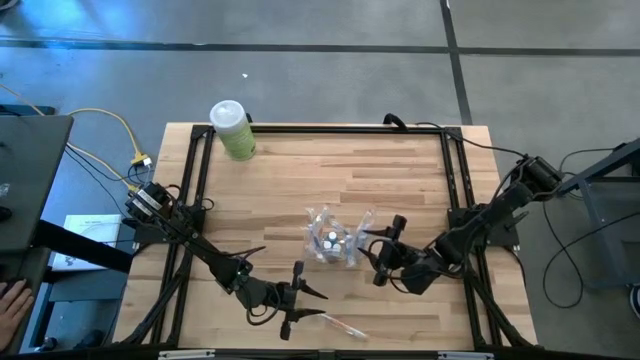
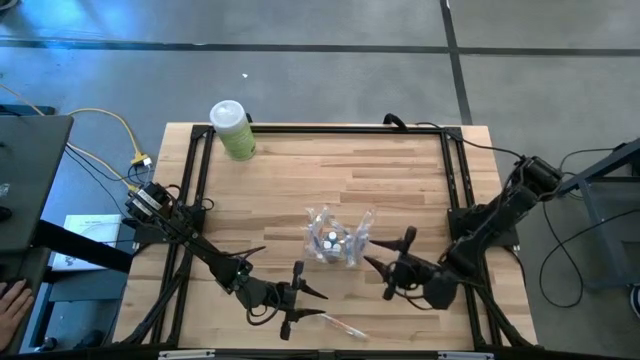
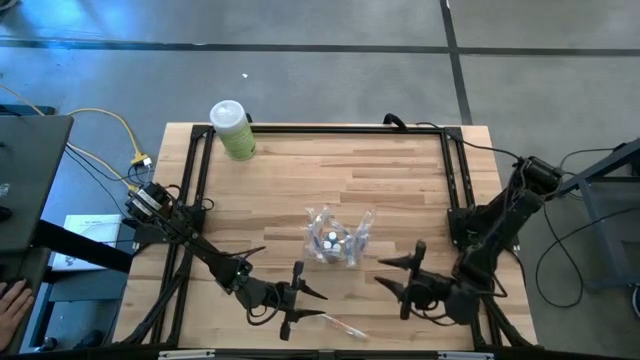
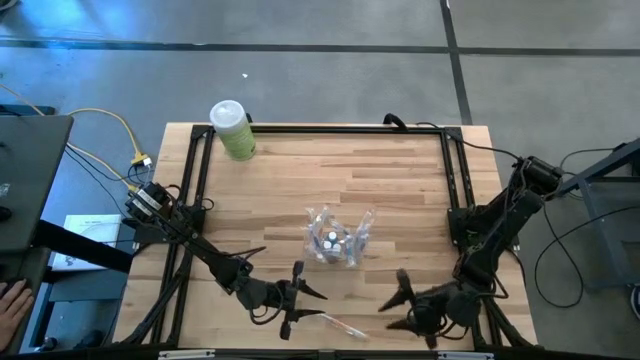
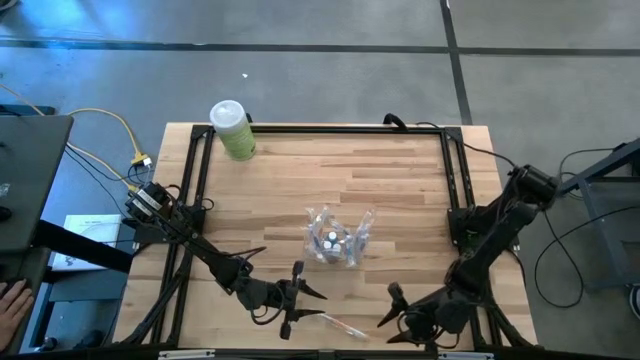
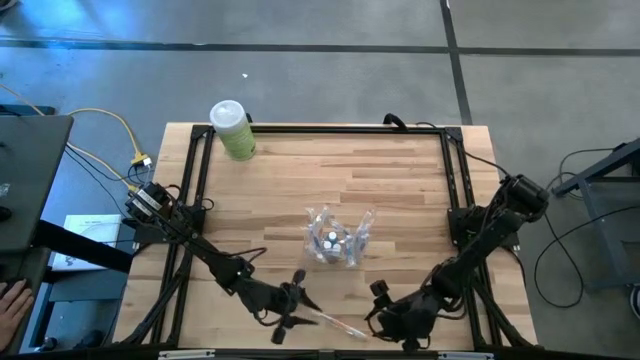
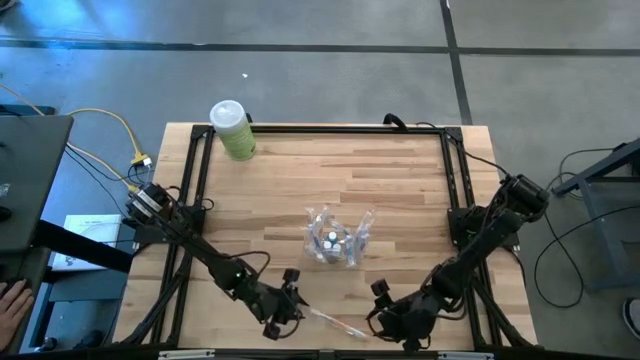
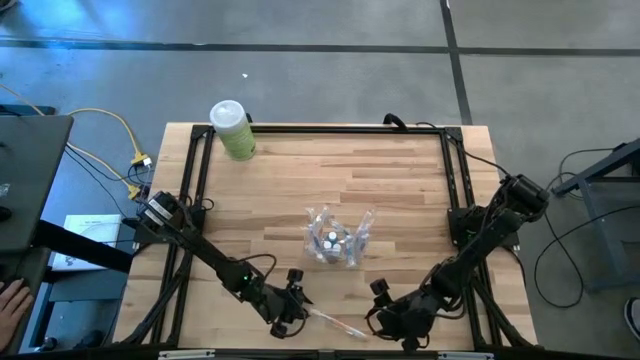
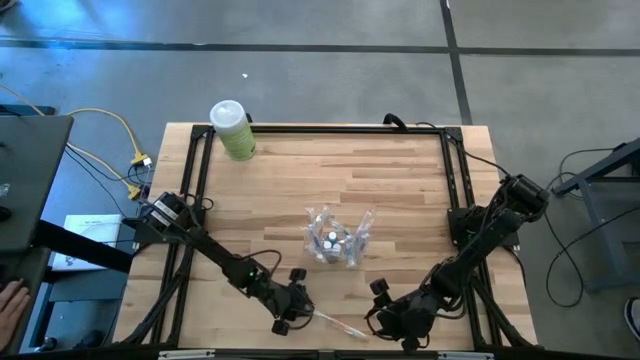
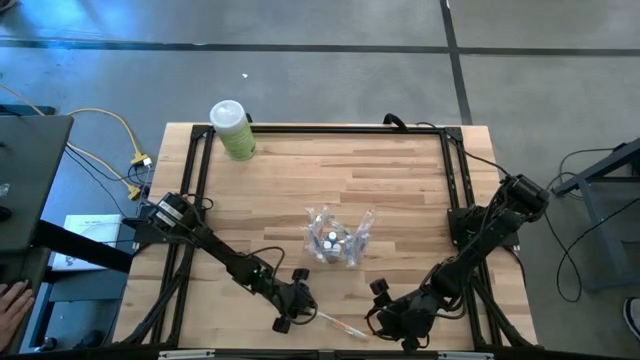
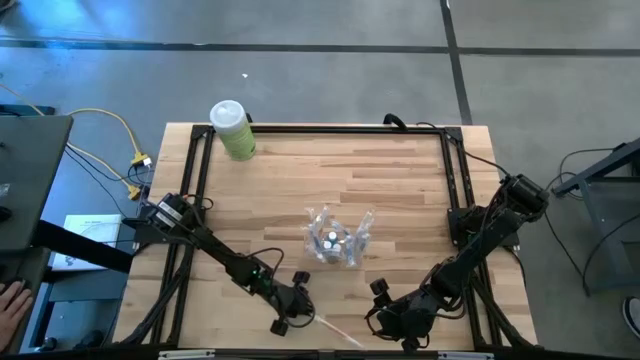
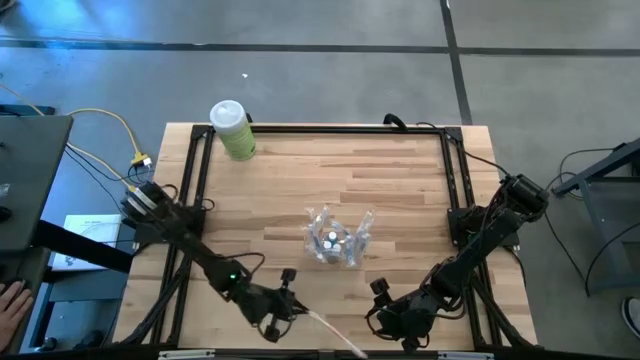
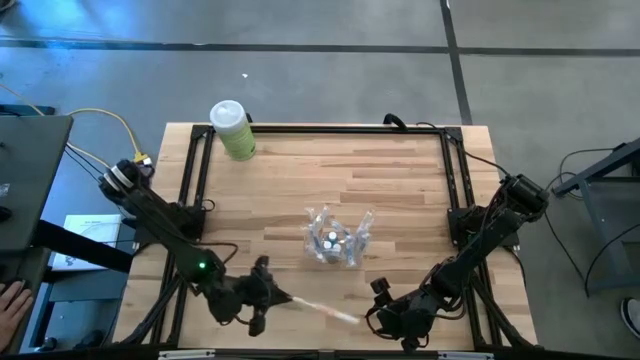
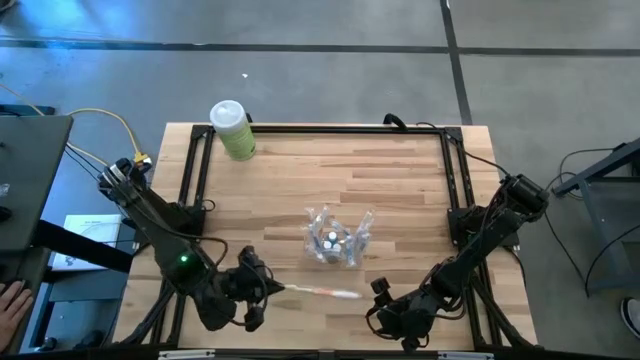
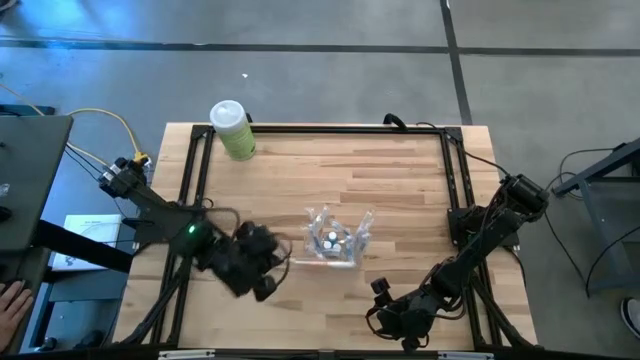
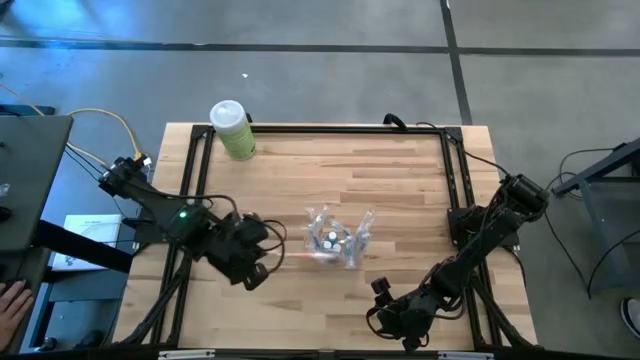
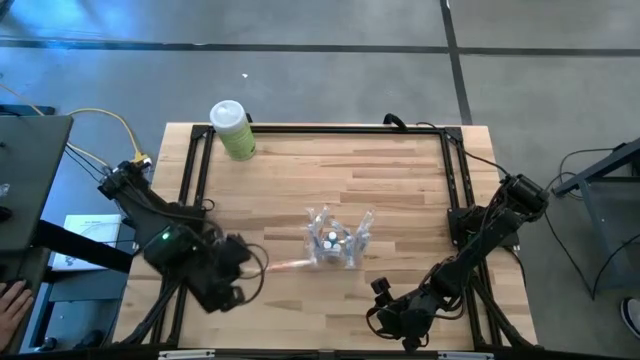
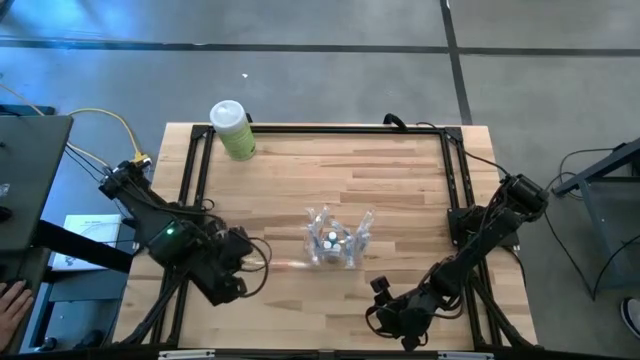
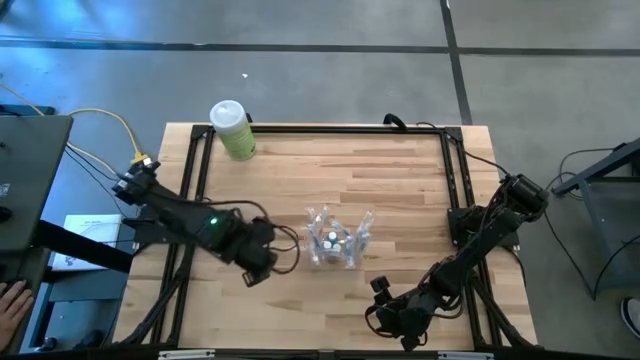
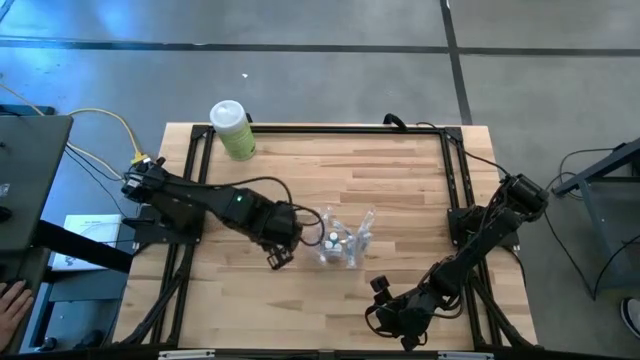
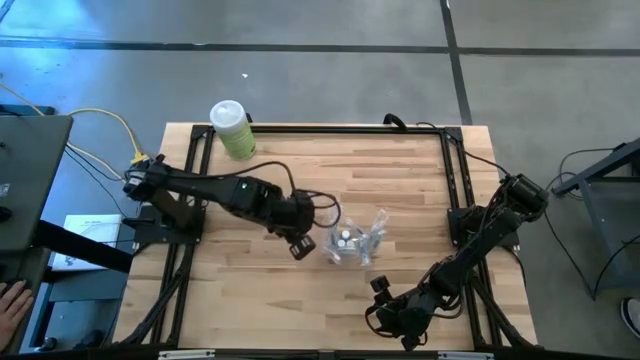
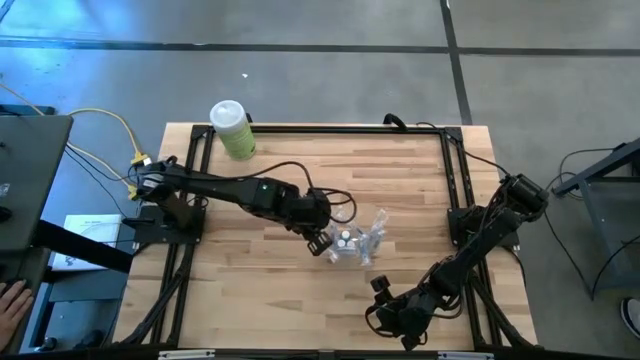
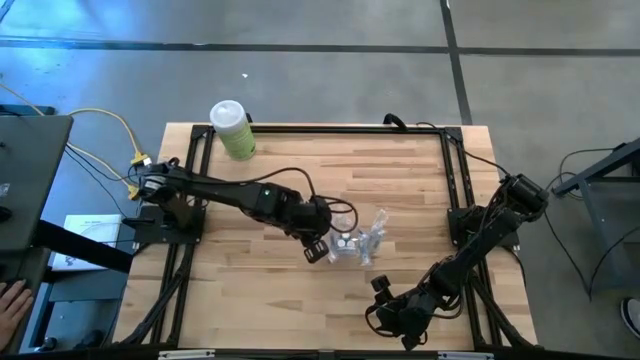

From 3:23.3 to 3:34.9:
Task: Pick & Place toothbrushing station
Put the orange toothbrush into the transparent organizer

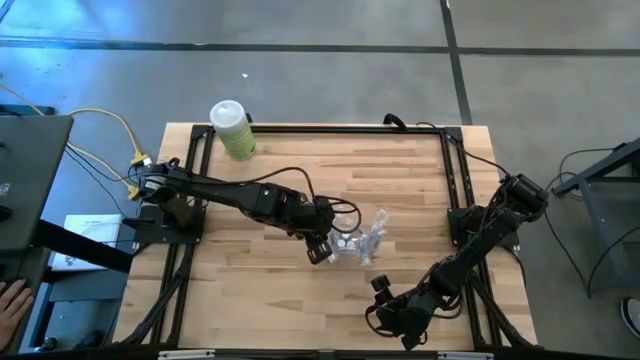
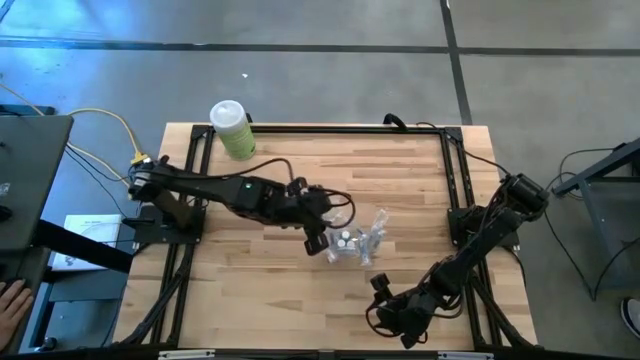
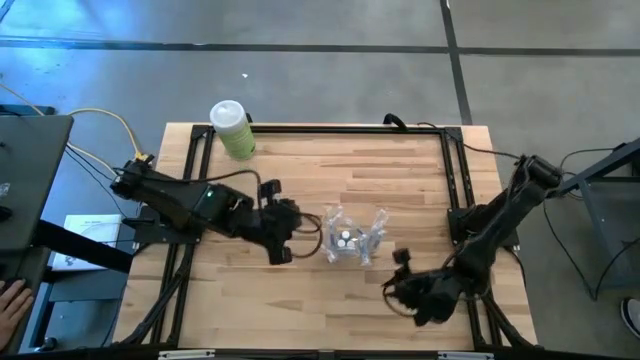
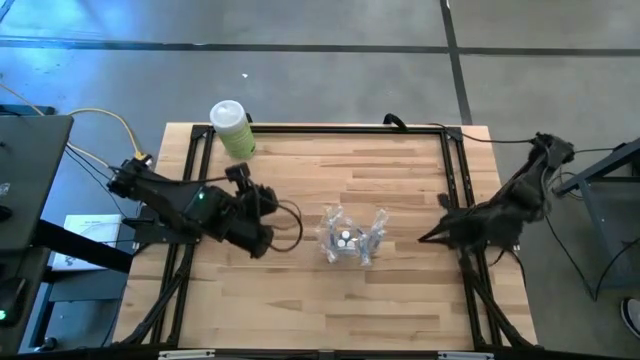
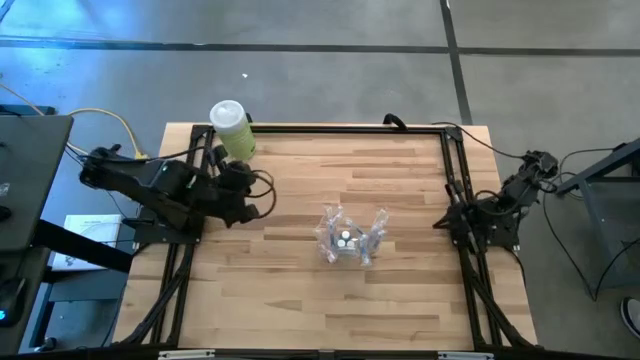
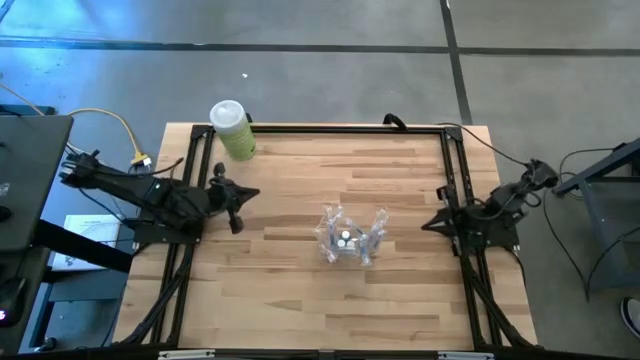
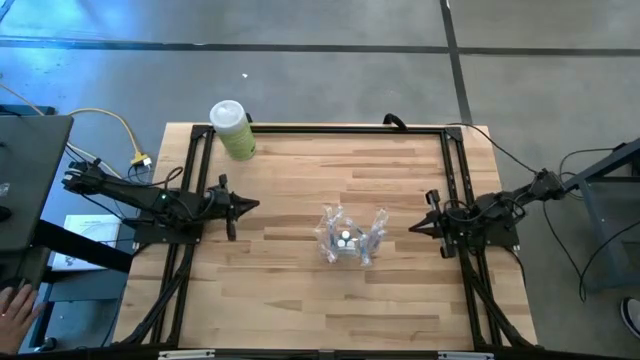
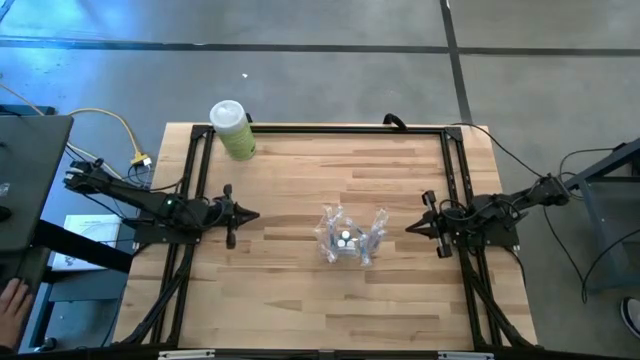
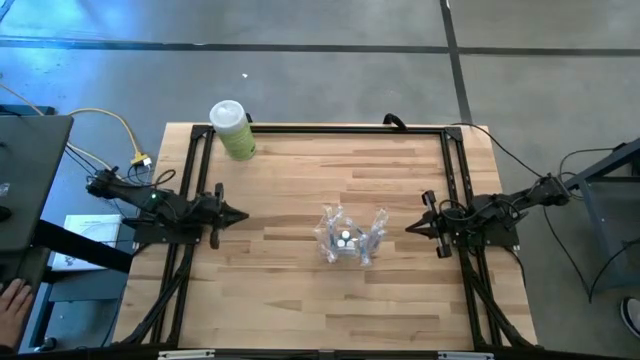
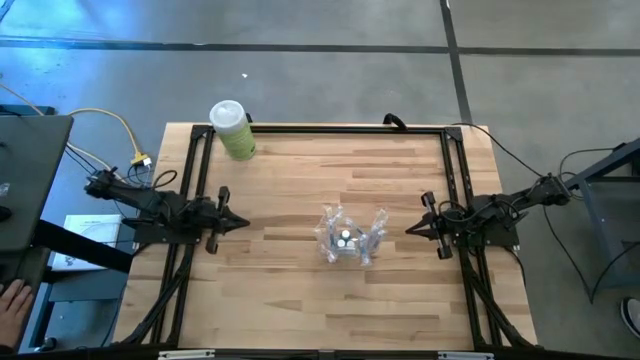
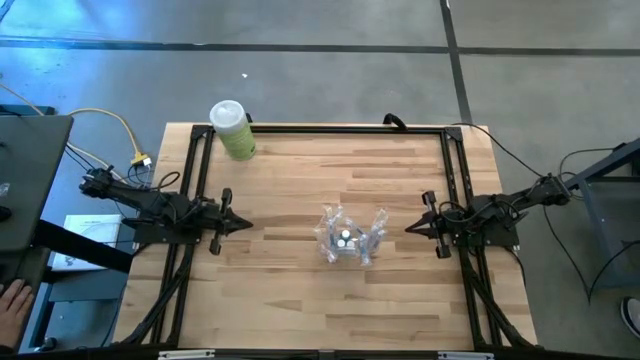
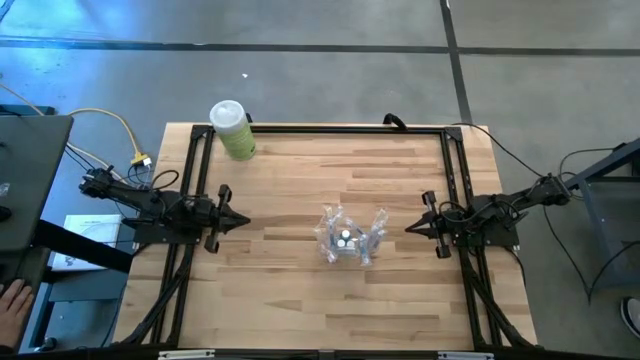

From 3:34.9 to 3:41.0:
Return to Home Position

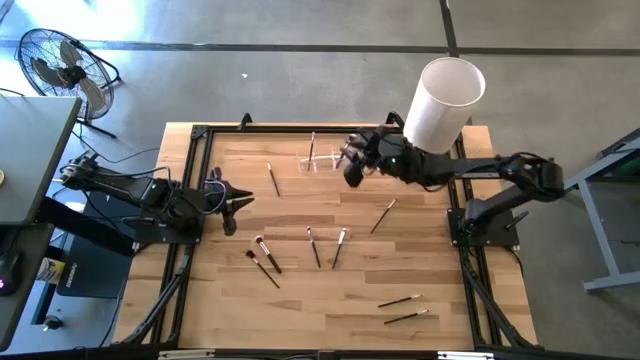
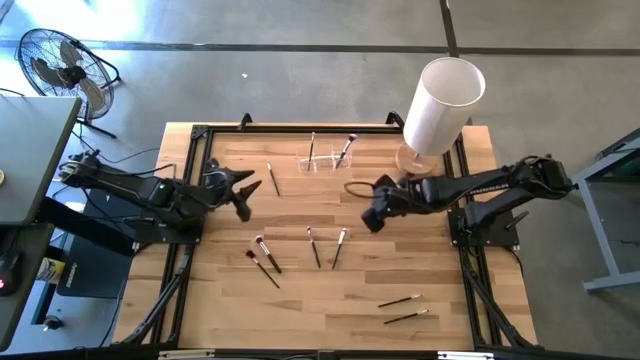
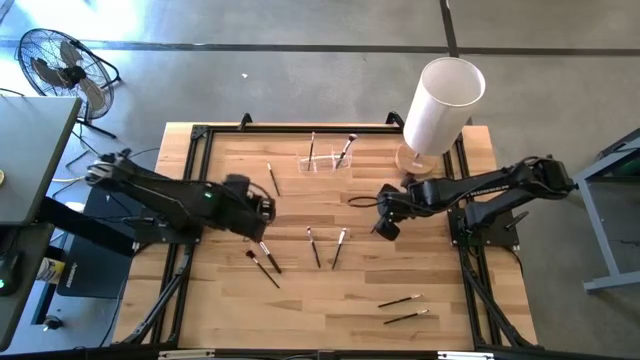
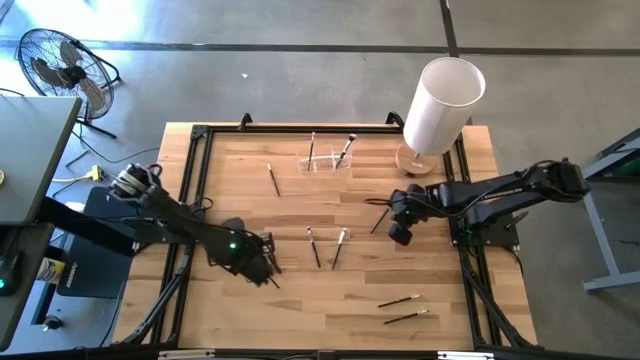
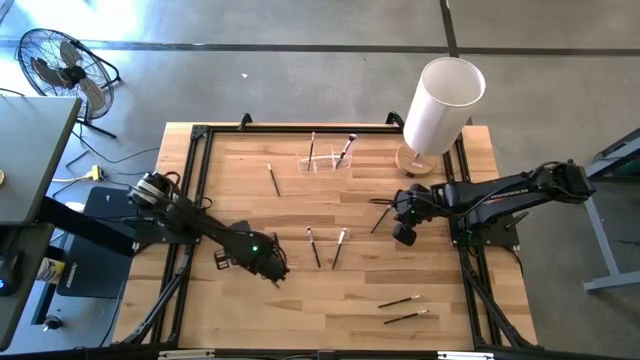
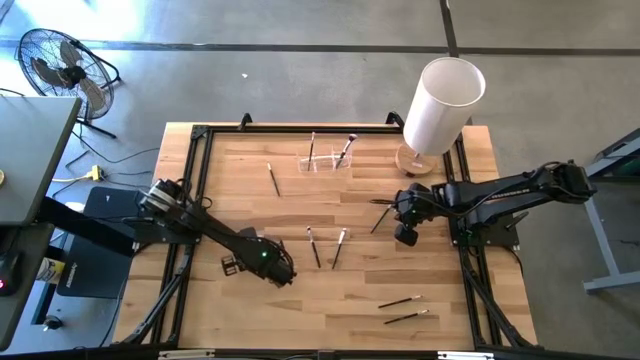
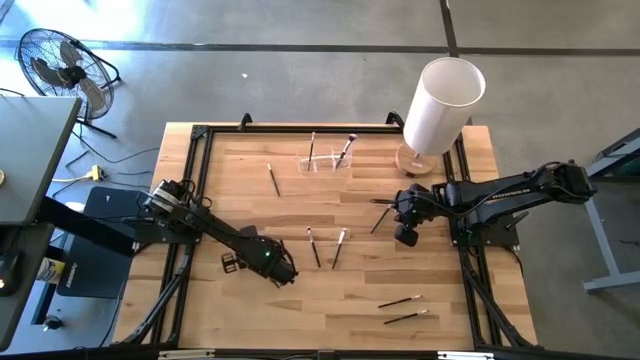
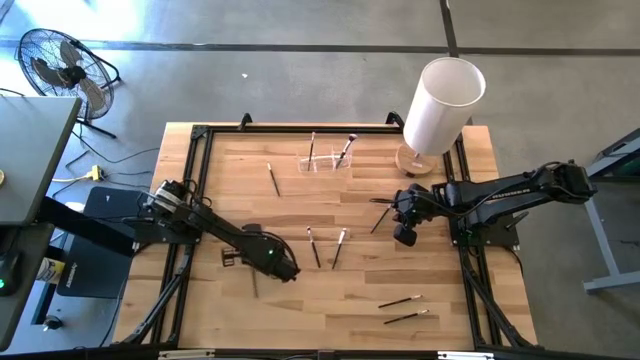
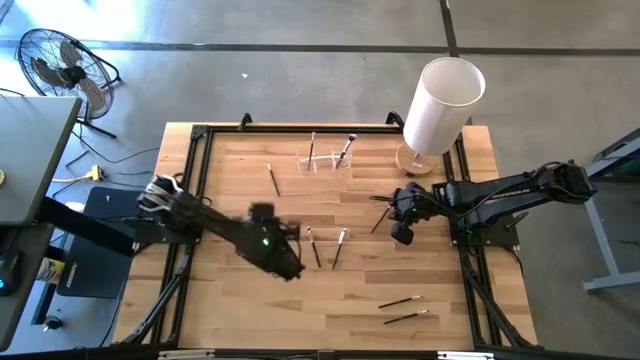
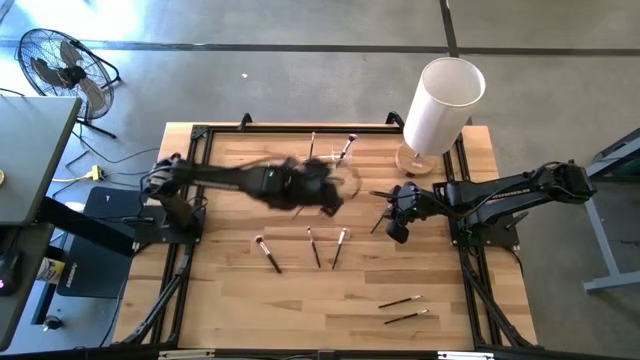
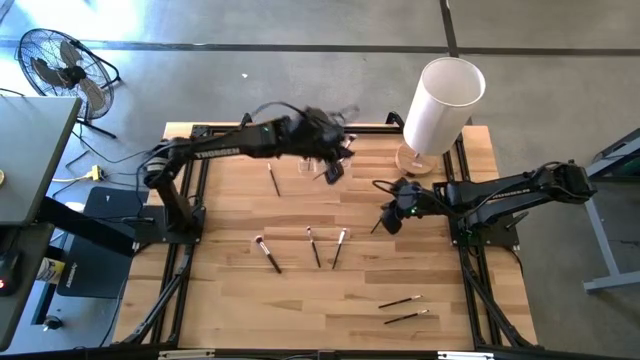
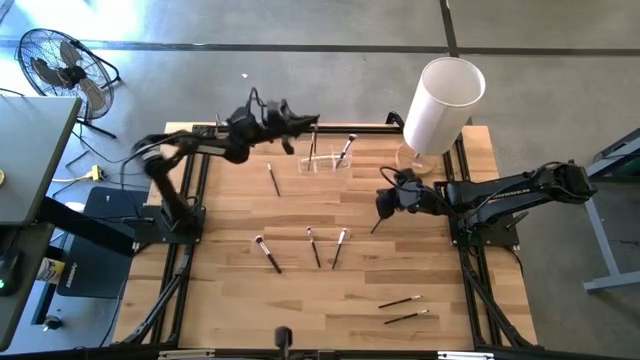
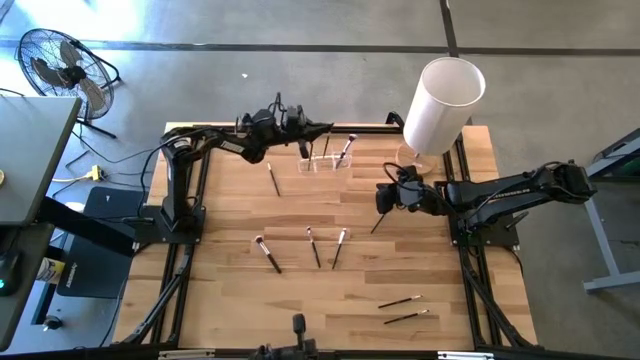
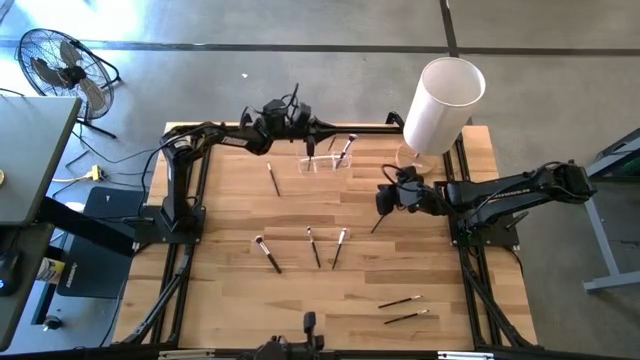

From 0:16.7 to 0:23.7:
Task: Pick & Place Makeup Brushes
Put the black lash brush into the transparent organizer
